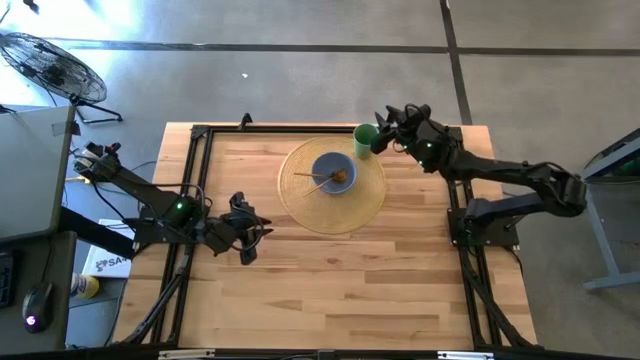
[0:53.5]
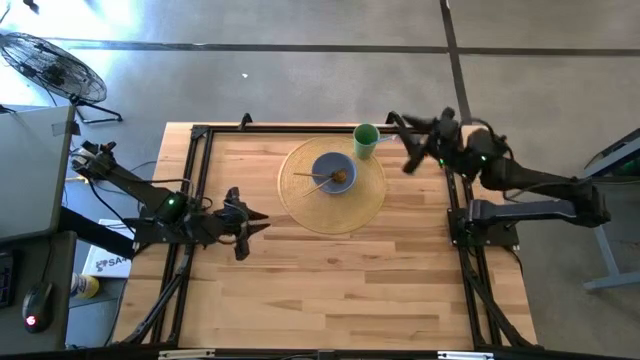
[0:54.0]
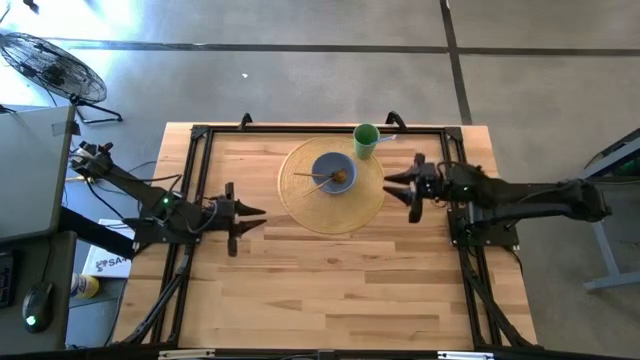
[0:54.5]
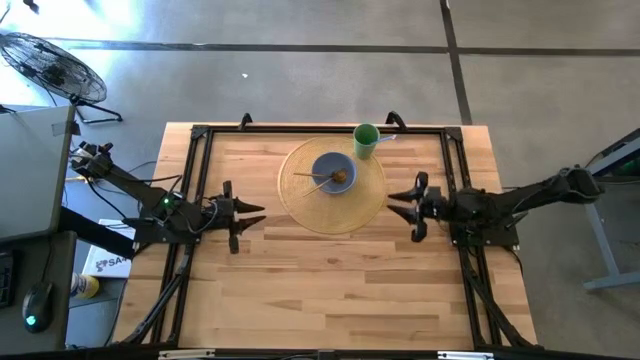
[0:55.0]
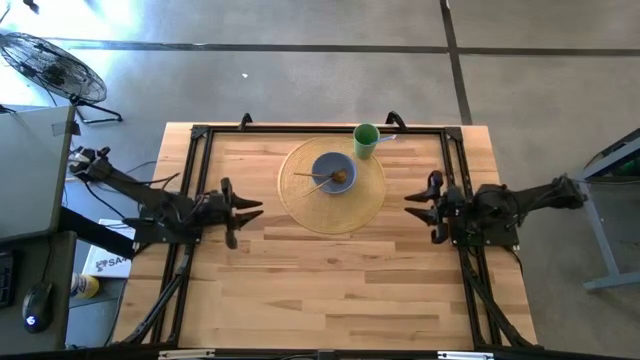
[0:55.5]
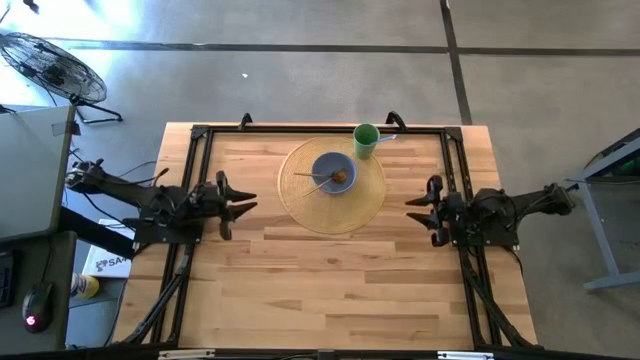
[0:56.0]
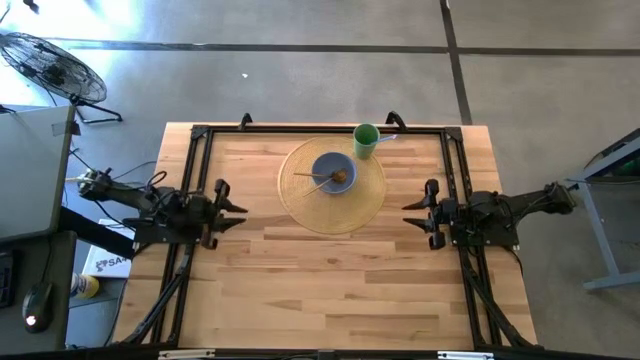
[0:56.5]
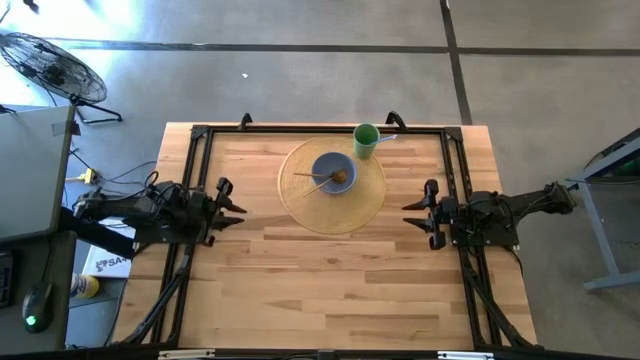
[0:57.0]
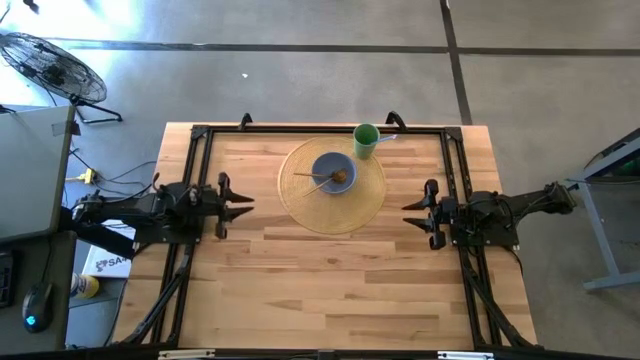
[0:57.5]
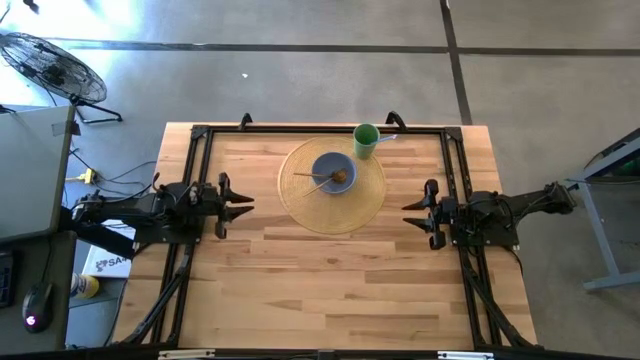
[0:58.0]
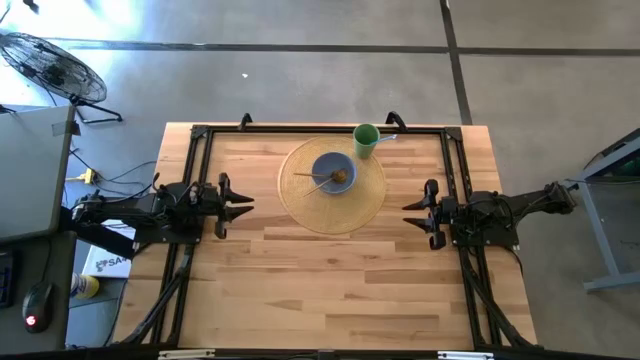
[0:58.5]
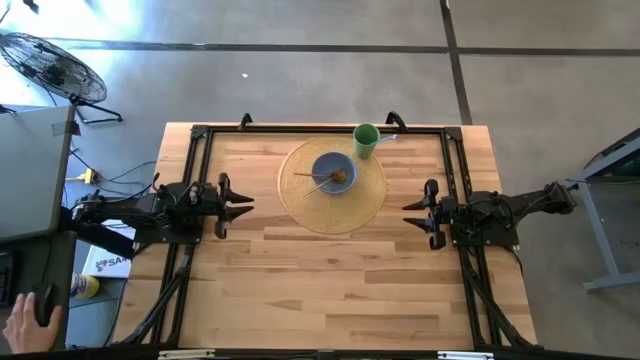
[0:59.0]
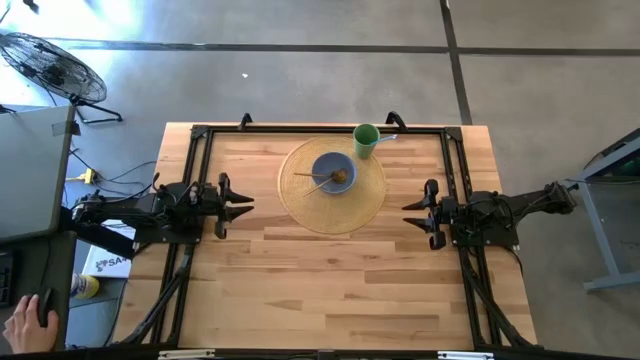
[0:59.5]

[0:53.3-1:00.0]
Task: Pick & Place Utensil
Return to Home Position

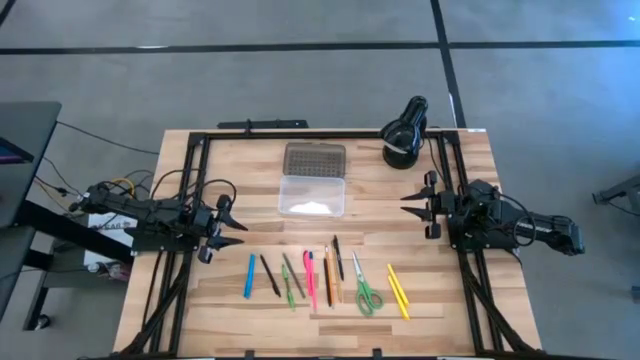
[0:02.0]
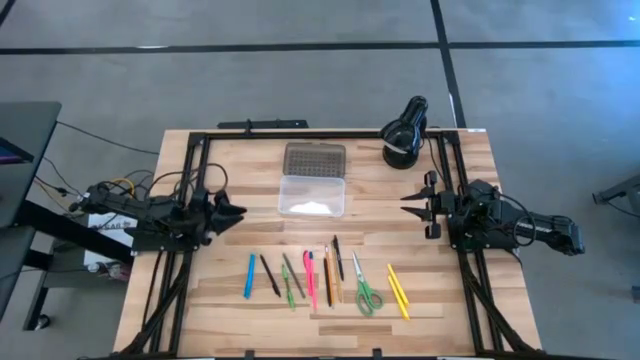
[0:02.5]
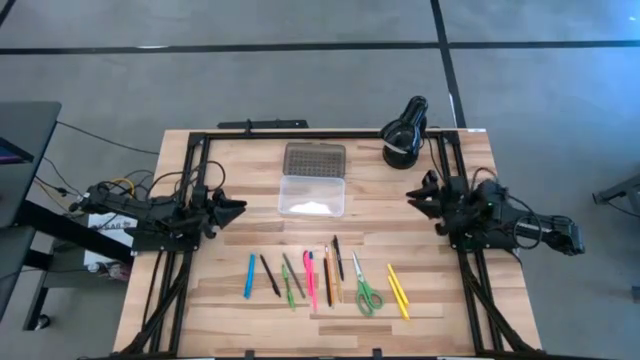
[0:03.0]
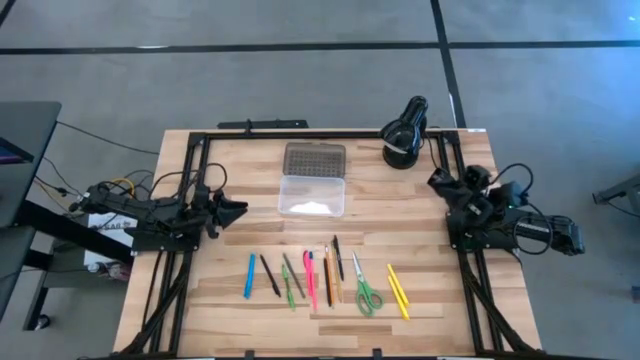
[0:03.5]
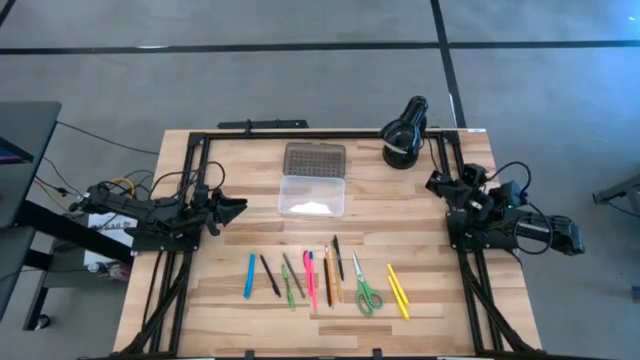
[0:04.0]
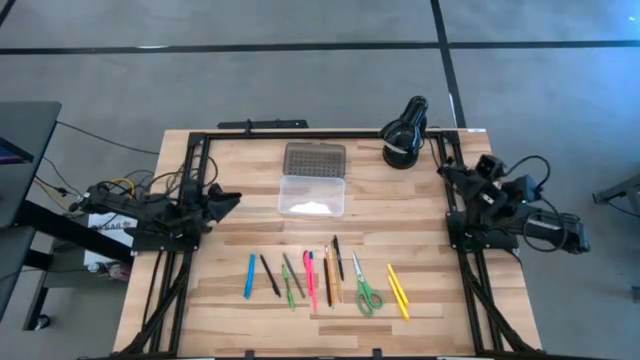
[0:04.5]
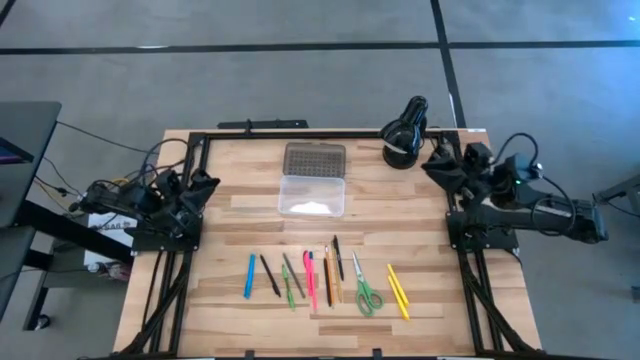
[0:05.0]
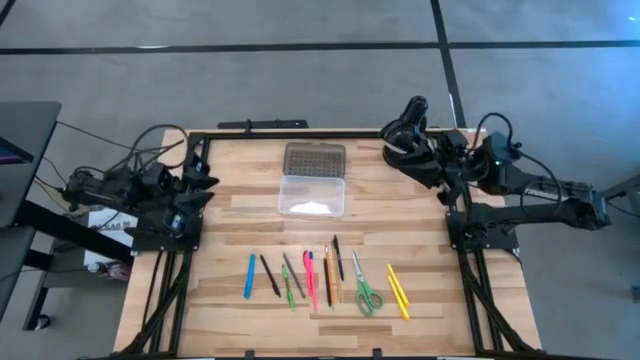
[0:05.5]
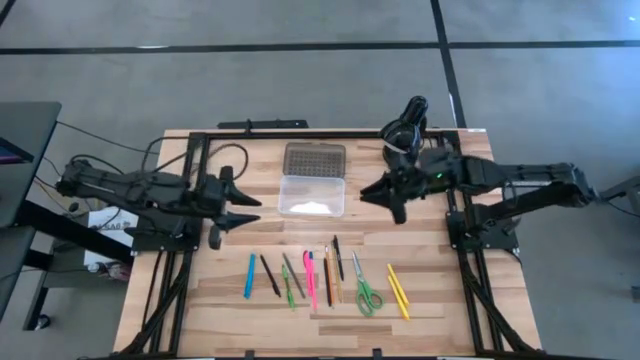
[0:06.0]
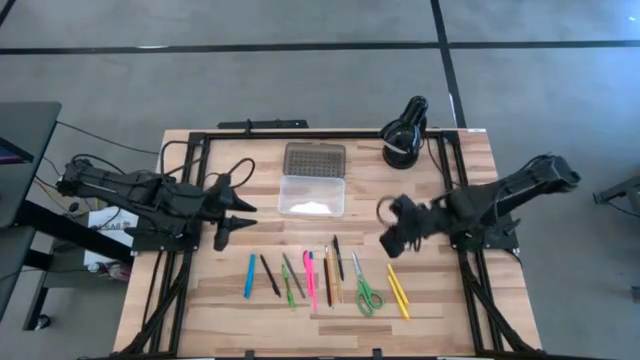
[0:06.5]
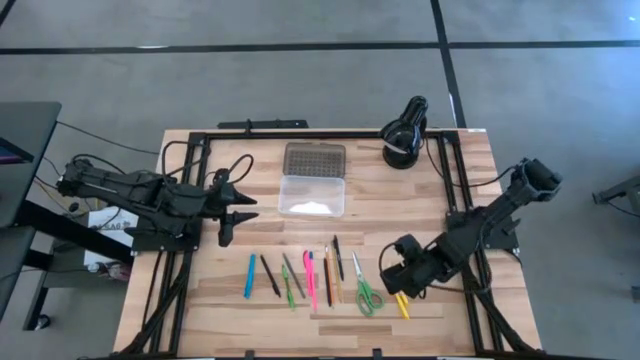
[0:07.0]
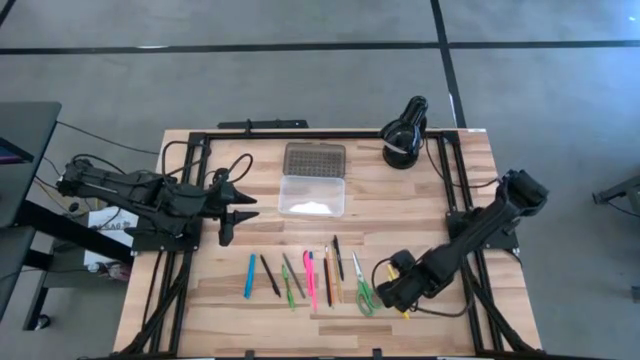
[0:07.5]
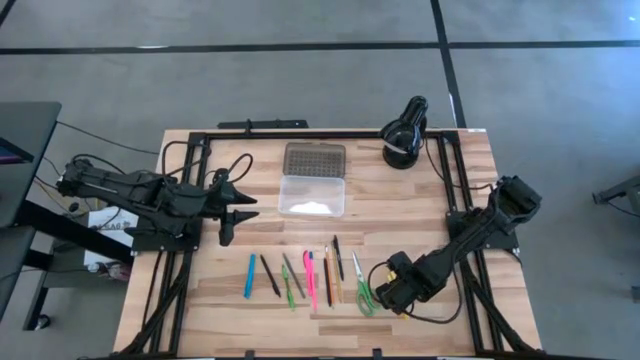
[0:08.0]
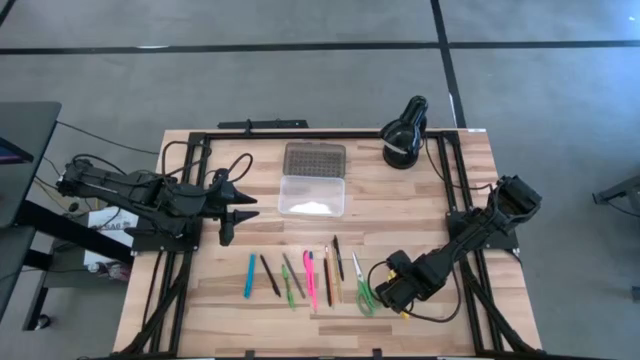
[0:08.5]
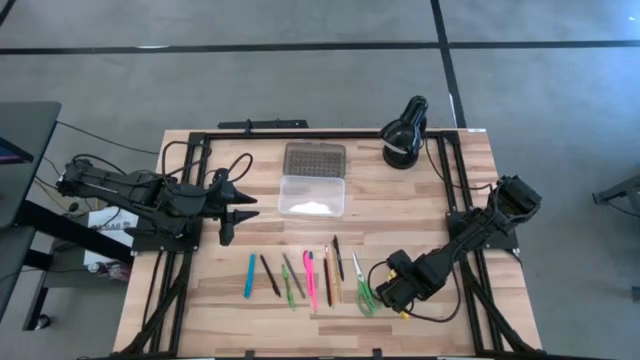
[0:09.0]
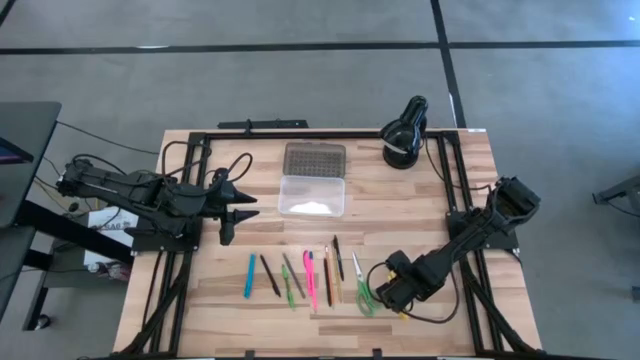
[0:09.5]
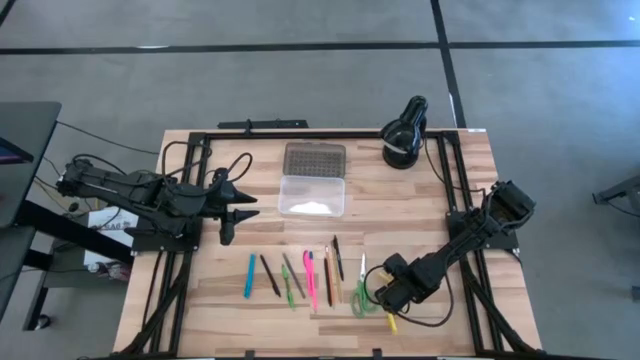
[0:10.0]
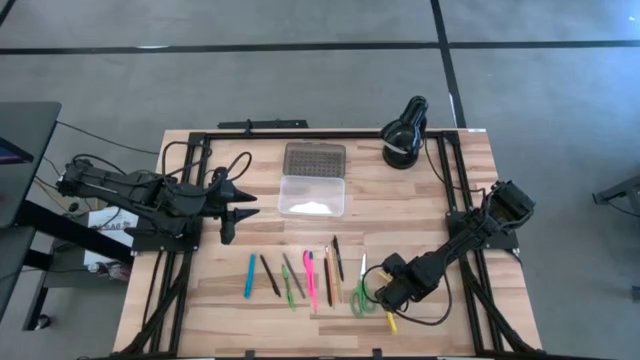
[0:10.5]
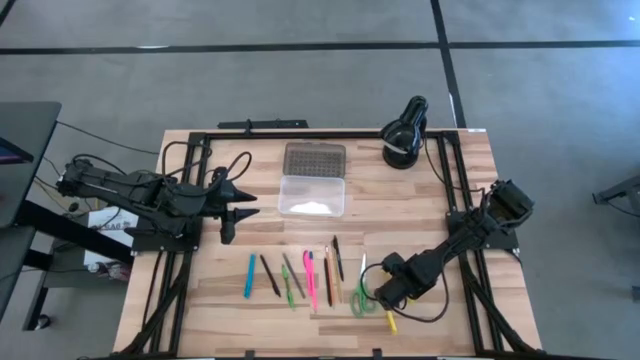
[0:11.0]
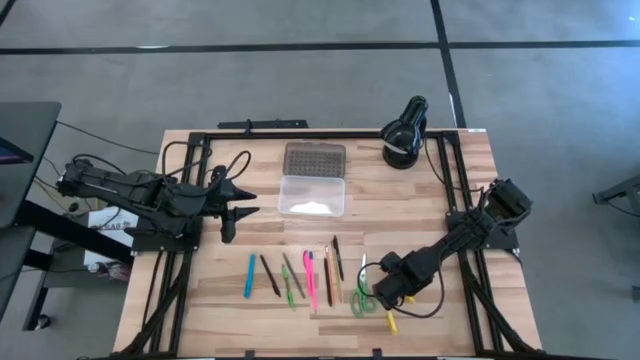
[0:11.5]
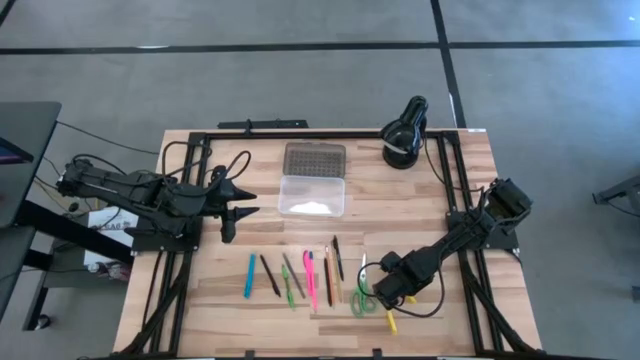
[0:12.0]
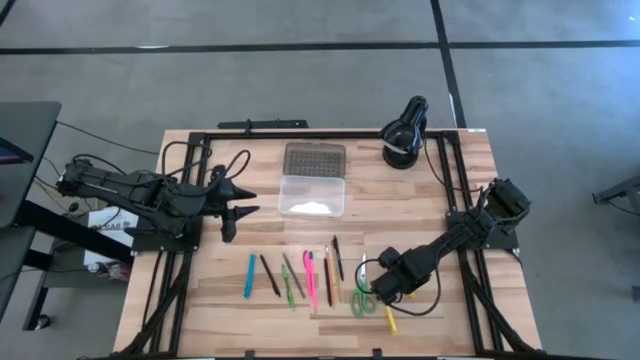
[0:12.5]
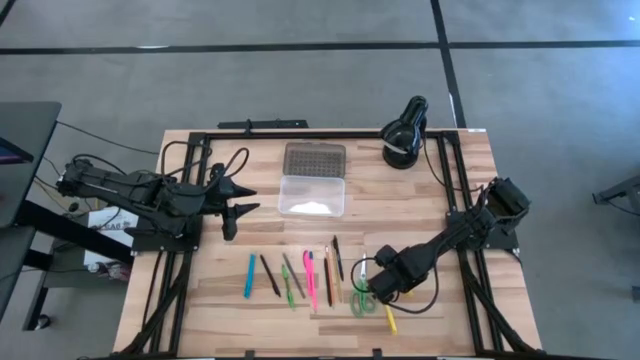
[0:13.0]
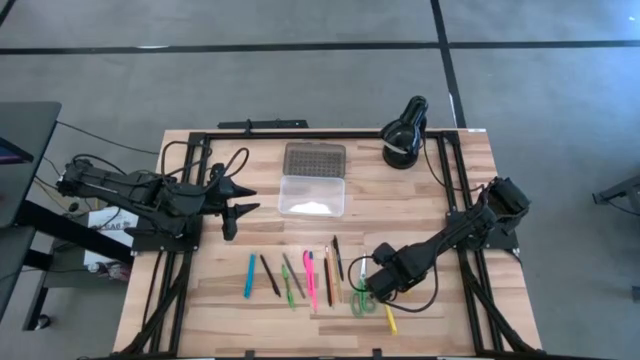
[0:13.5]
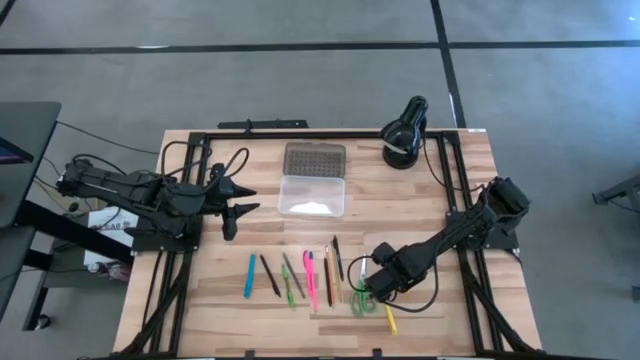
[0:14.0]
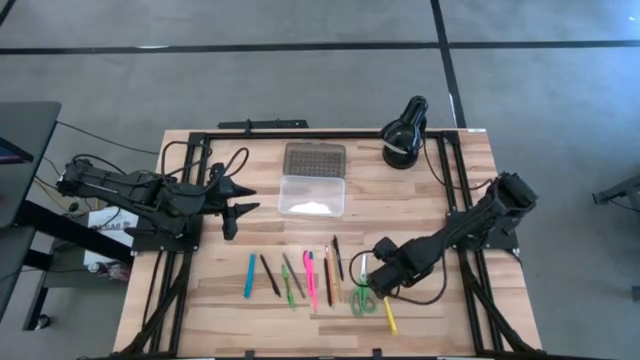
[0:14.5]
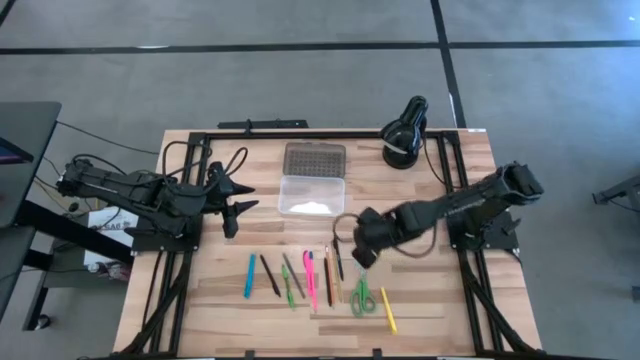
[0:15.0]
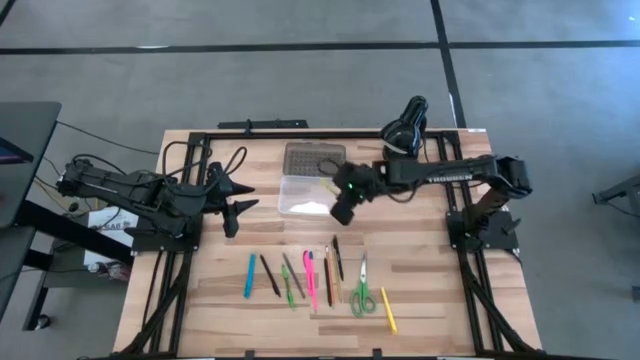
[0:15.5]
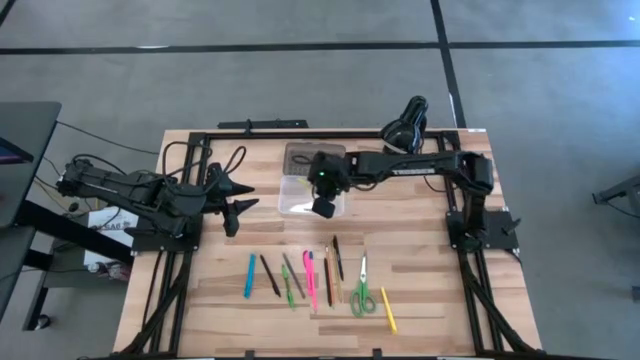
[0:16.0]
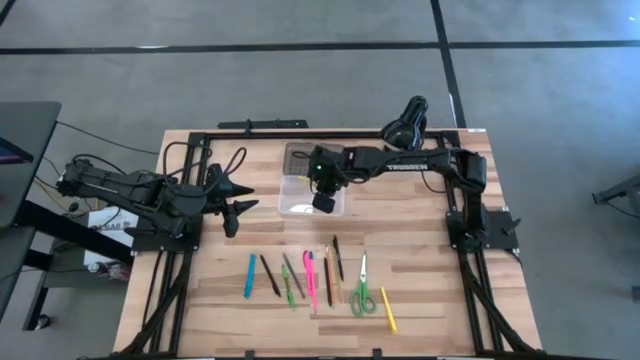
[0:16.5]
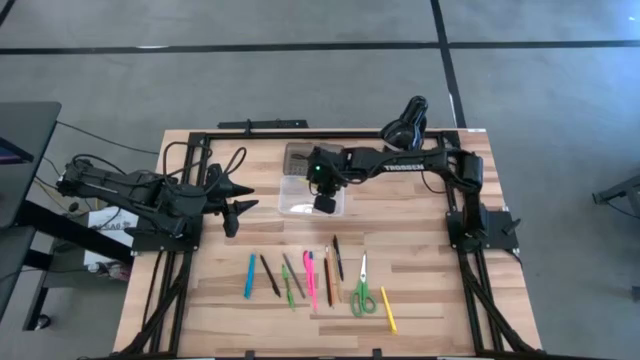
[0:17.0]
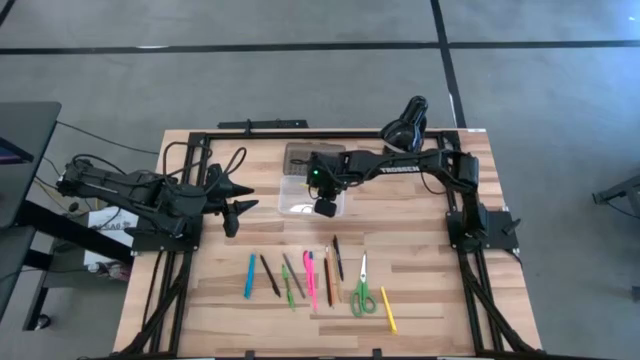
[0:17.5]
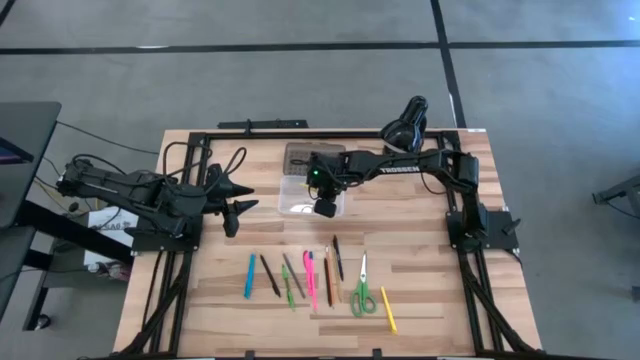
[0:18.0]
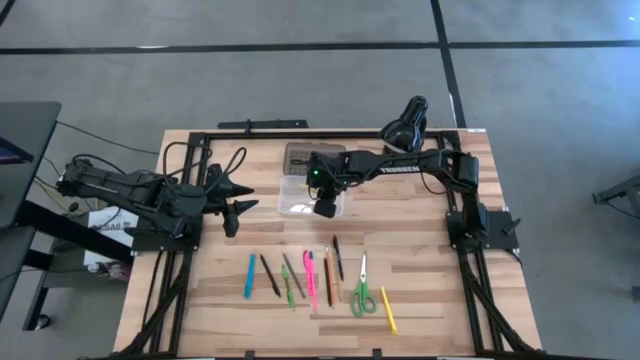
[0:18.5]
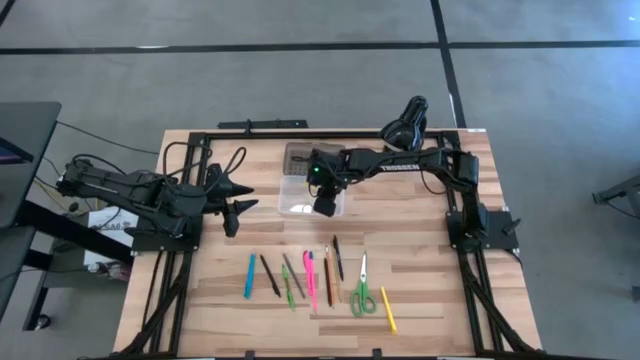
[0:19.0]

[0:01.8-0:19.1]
Task: Pick & place school supplies into a supply box
Put the right yellow pen into the supply box
